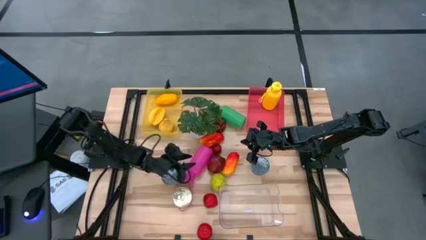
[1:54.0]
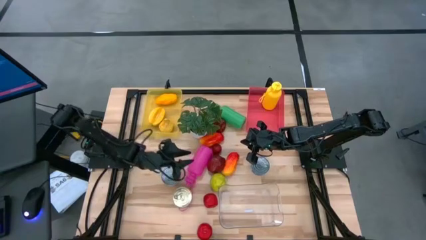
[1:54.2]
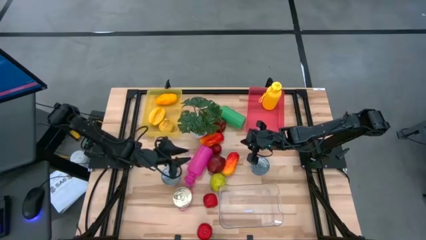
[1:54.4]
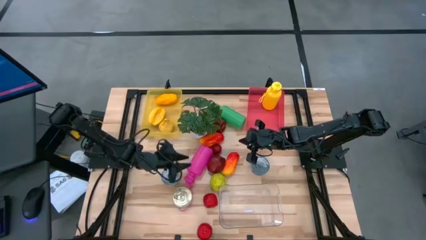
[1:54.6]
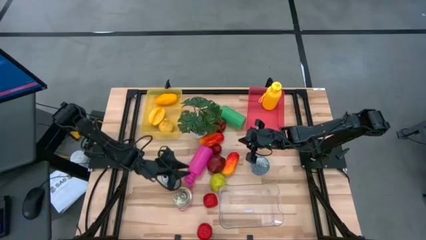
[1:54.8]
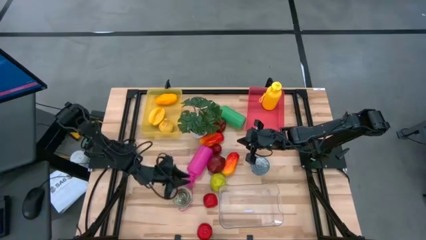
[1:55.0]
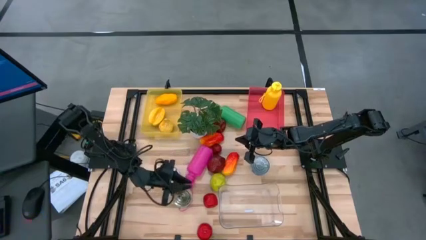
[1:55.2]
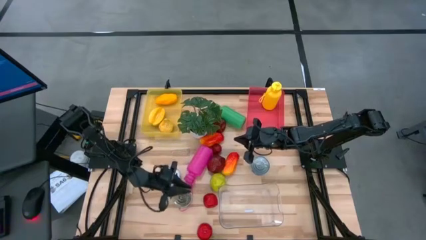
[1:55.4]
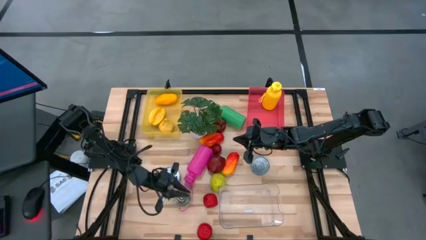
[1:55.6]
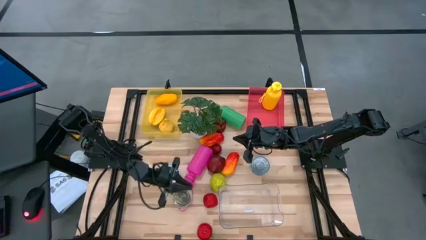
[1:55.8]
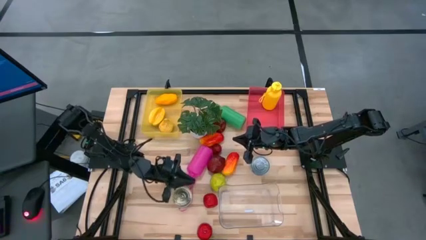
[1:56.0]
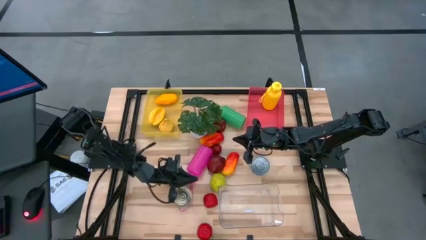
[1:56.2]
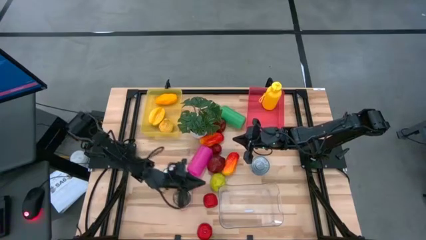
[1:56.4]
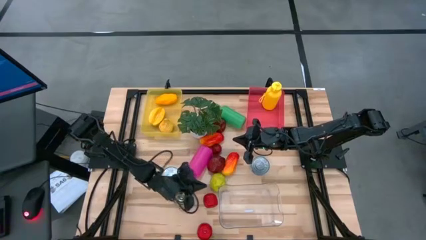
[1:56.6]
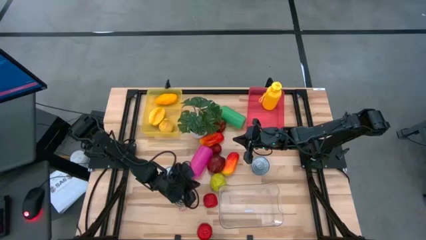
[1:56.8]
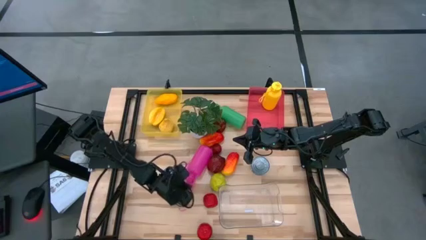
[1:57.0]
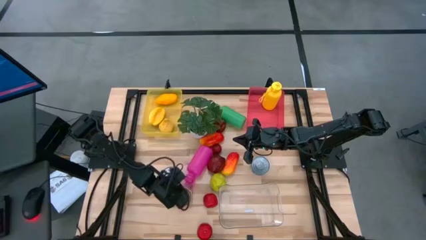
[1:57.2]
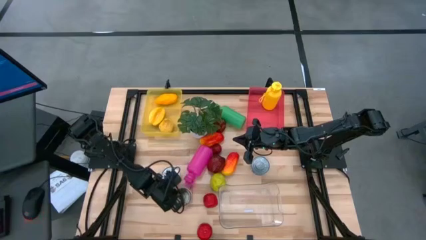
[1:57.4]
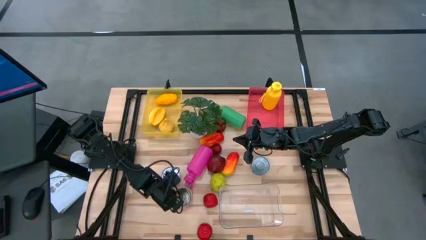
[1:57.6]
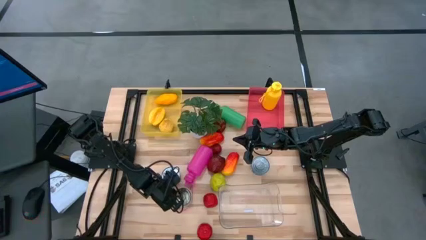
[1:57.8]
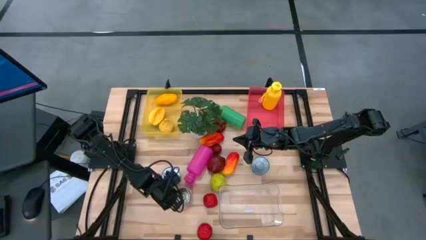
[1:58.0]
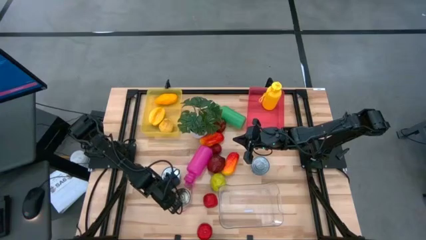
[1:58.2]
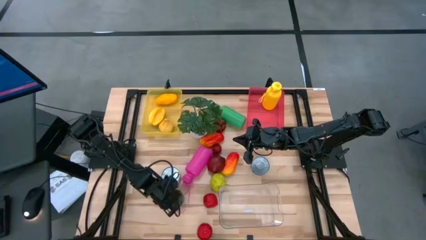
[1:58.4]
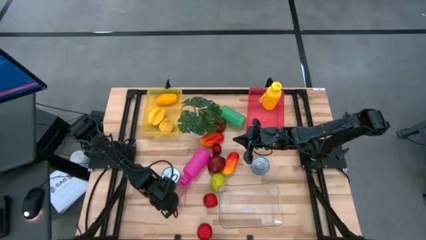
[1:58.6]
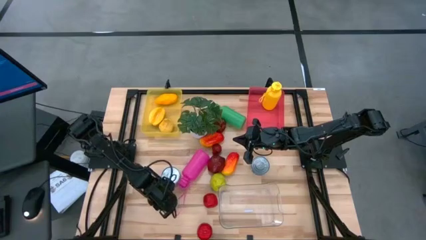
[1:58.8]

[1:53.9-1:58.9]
Task: Pick & Place Food Item
Adjust the blue pink tuna can

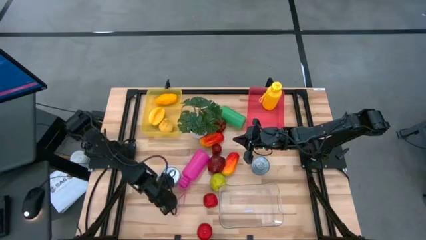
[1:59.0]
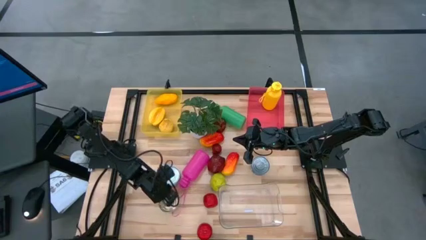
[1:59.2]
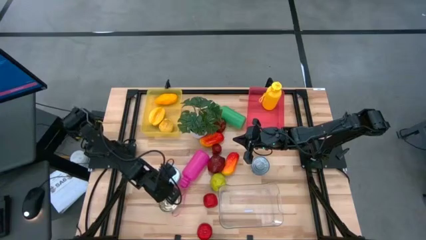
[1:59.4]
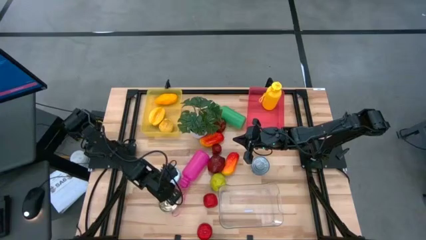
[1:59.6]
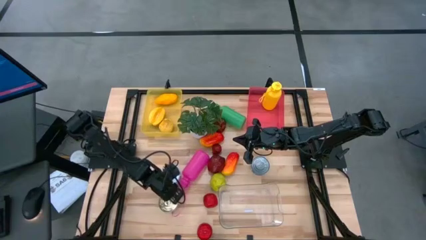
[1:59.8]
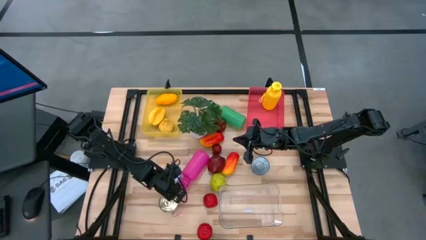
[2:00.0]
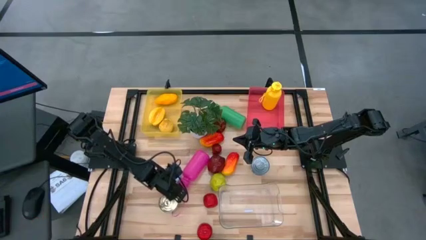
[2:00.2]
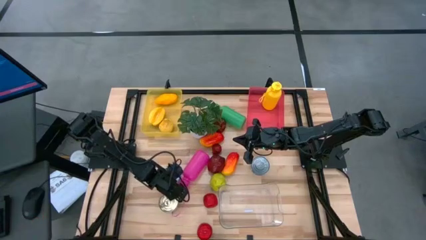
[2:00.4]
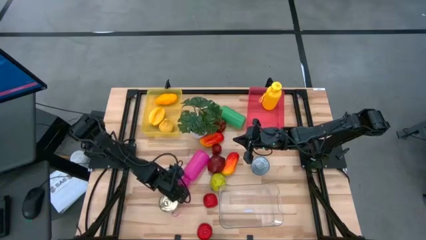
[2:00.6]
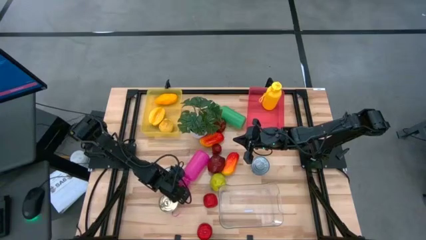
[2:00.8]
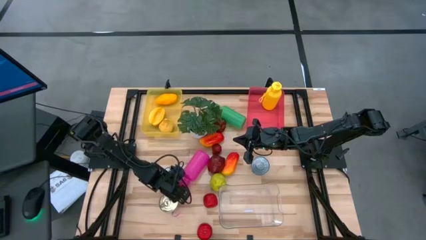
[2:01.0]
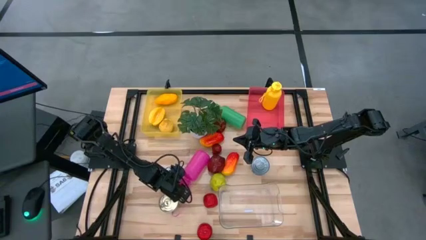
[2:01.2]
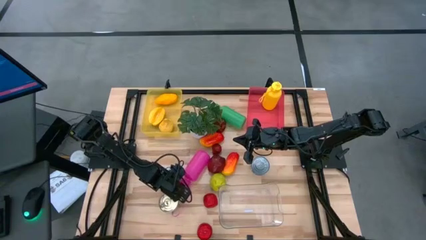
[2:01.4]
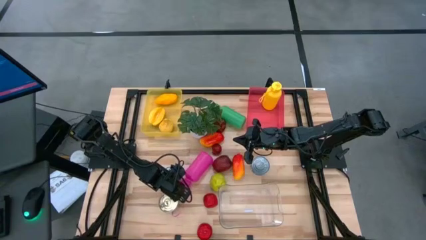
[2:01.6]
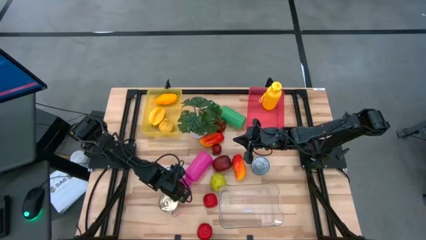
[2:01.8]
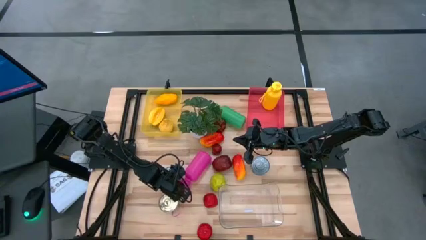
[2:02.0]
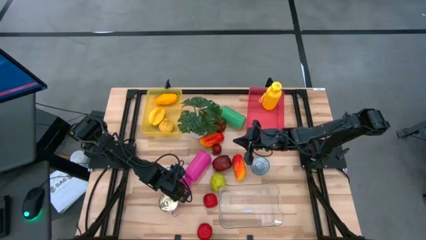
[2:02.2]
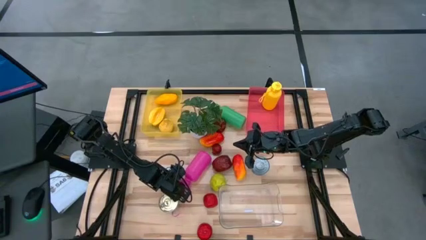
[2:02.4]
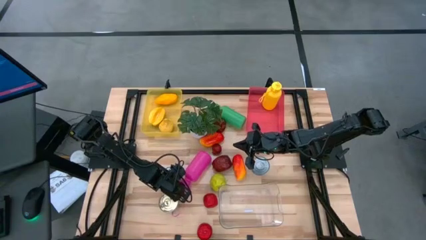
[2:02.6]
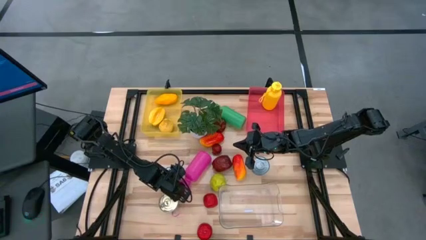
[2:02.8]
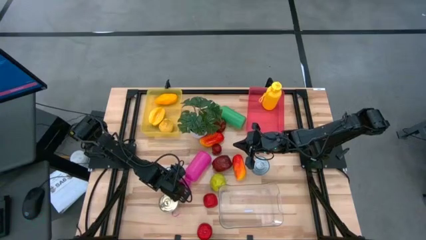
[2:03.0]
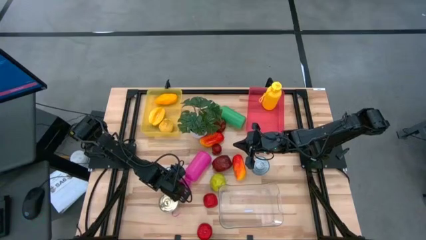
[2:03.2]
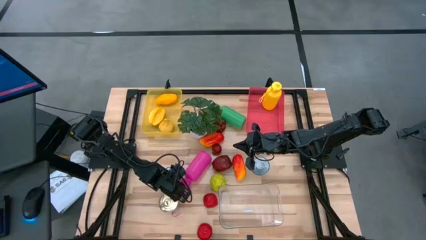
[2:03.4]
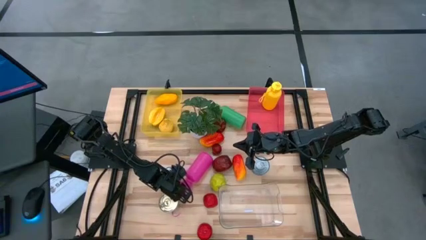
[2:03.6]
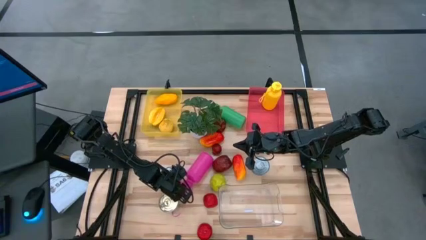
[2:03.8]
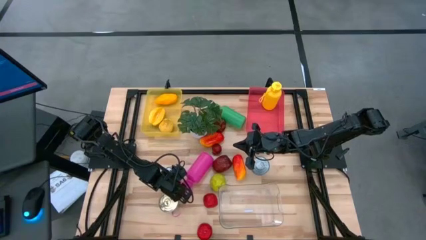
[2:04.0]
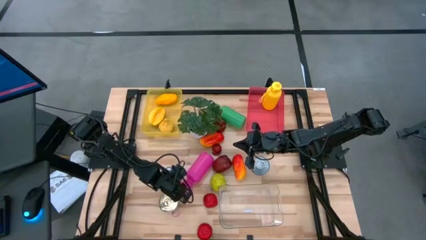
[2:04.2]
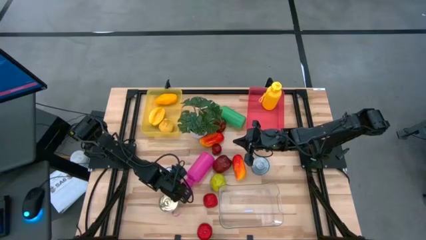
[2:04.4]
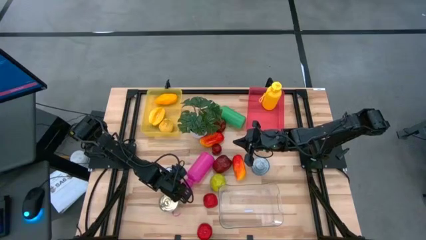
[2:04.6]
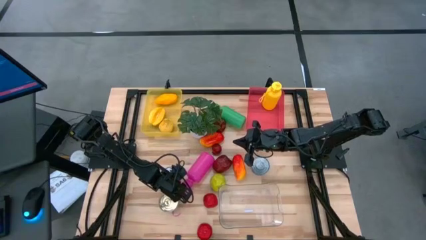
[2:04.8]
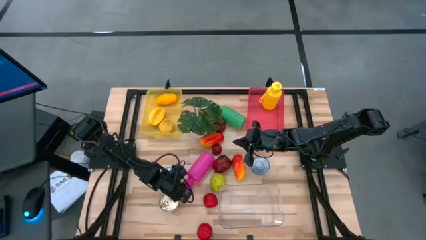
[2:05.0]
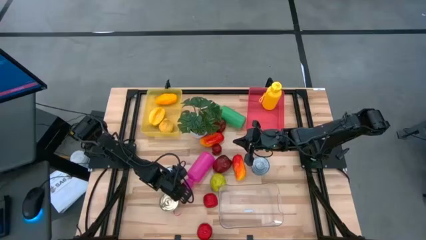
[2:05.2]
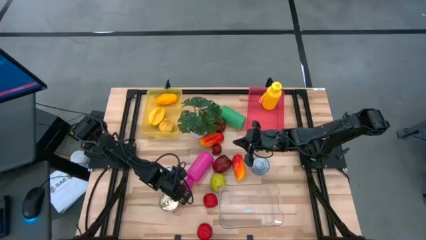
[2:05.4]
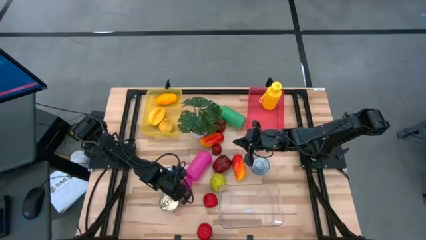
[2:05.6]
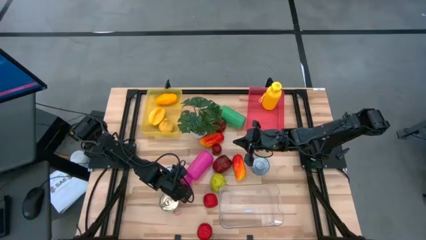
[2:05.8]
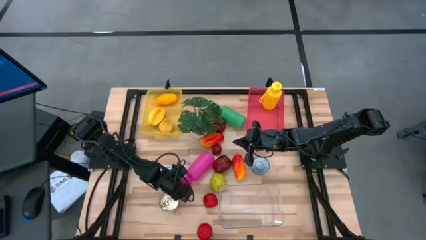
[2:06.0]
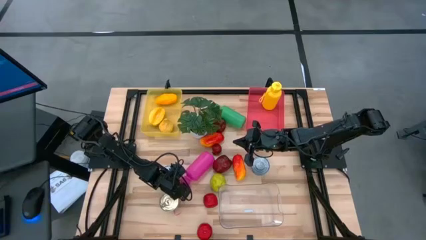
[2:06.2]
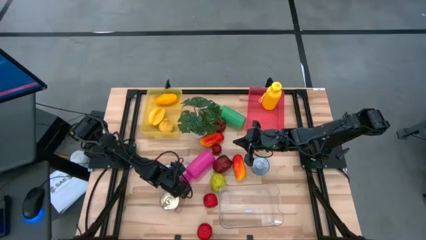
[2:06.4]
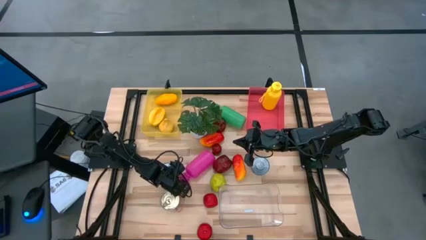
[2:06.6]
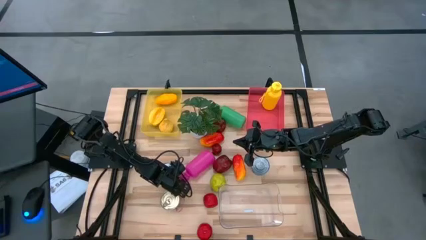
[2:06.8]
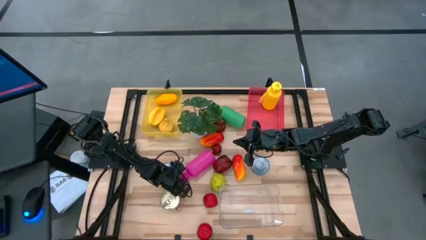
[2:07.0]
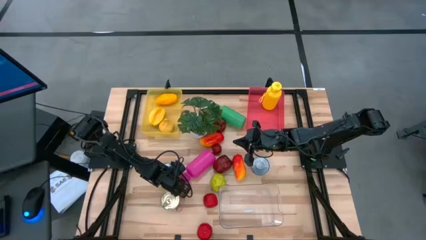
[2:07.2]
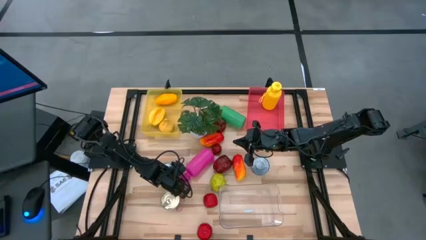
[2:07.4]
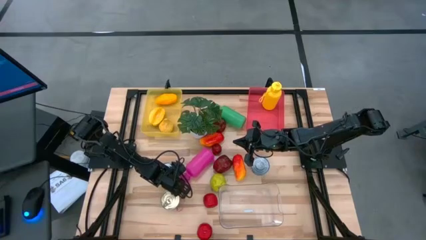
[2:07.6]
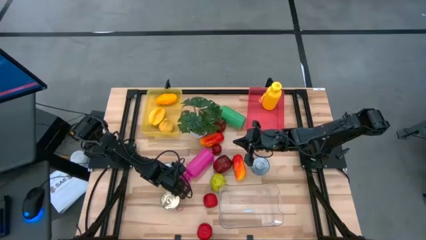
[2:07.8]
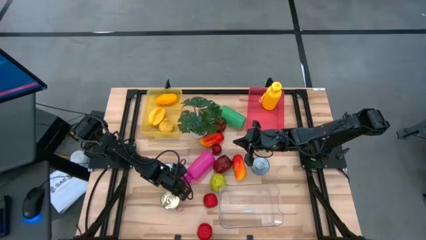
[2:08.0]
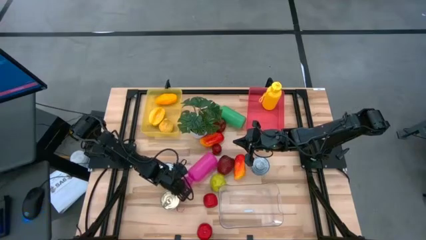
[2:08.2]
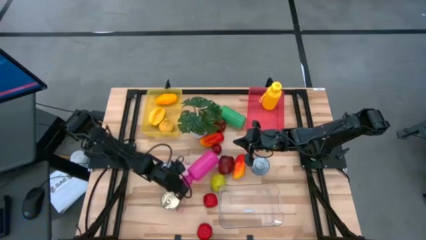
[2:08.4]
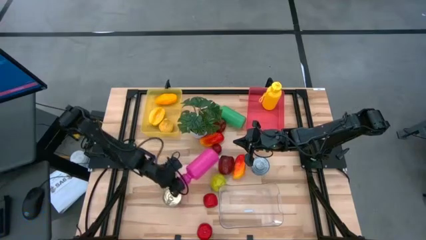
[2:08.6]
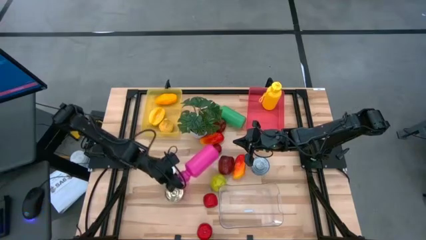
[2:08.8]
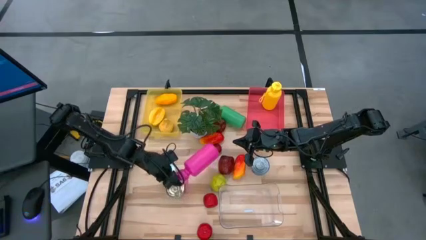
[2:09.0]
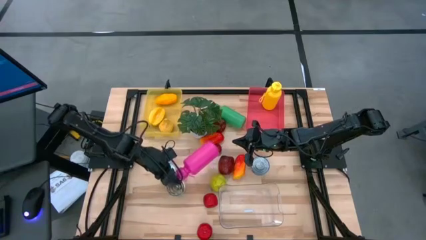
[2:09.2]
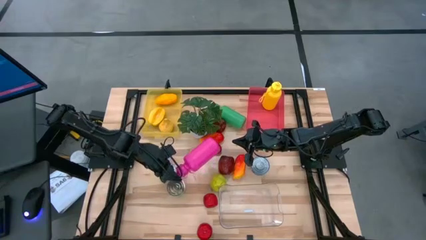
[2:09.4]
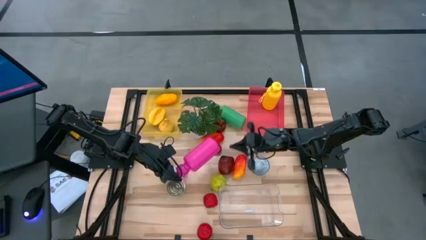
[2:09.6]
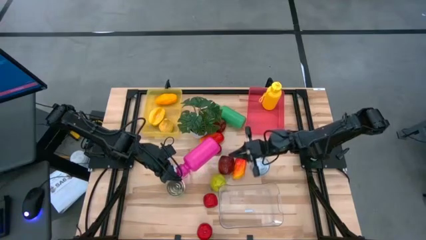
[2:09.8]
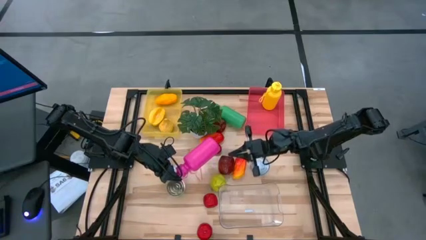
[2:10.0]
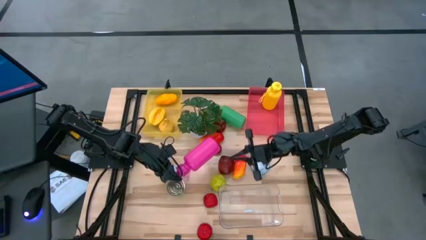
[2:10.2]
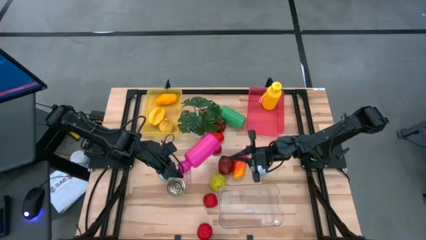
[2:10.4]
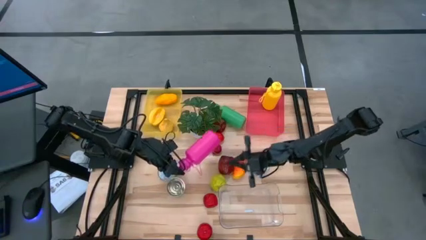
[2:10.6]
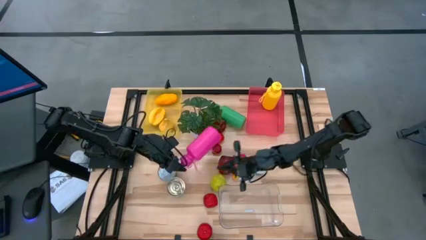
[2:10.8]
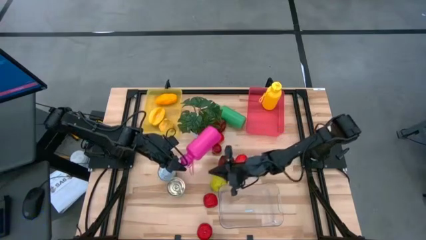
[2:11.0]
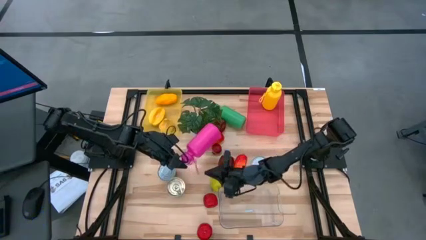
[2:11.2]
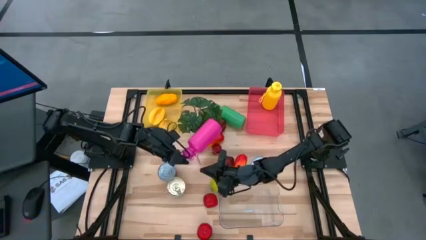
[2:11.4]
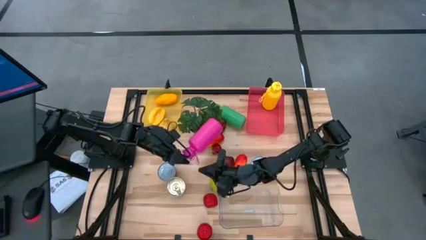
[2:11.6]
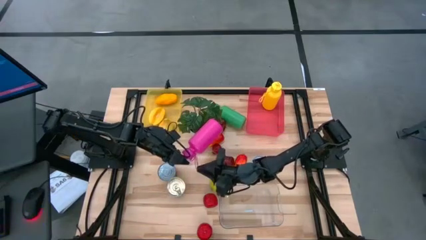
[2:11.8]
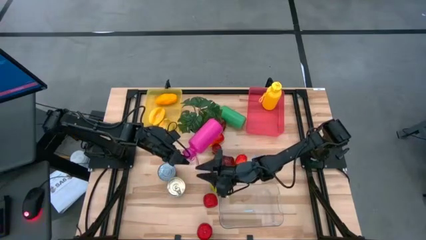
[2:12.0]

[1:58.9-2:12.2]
Put the pink water bottle into the pink bin
